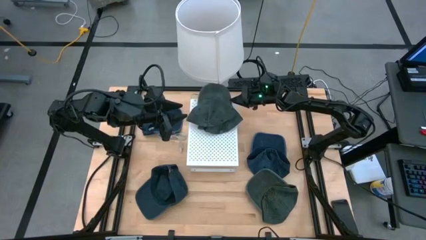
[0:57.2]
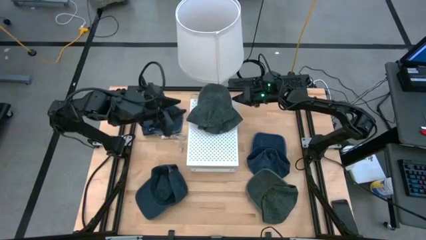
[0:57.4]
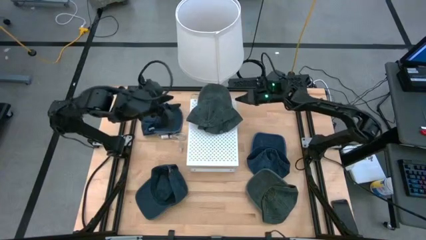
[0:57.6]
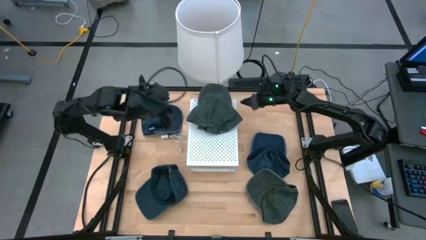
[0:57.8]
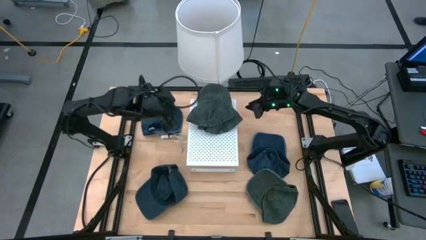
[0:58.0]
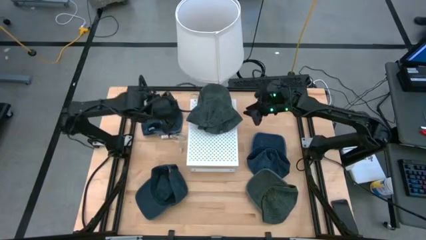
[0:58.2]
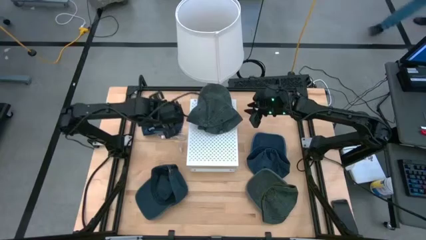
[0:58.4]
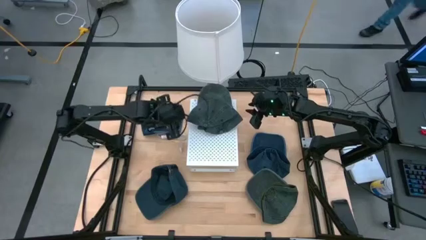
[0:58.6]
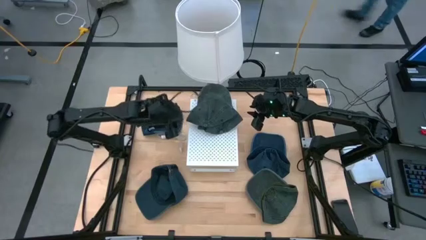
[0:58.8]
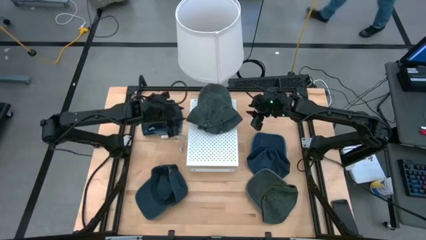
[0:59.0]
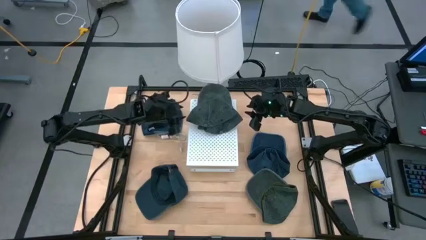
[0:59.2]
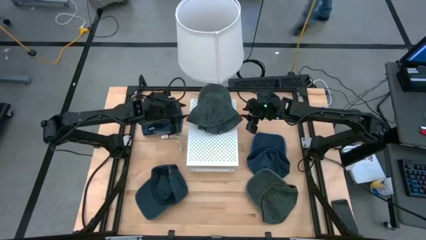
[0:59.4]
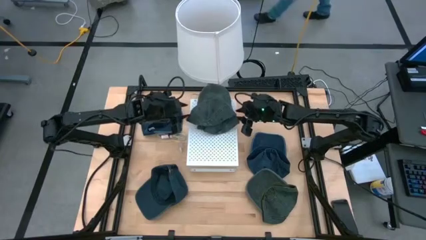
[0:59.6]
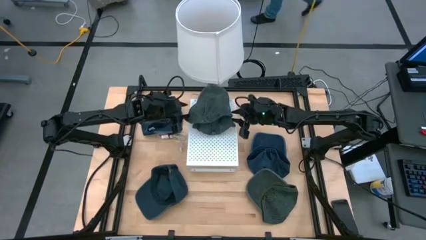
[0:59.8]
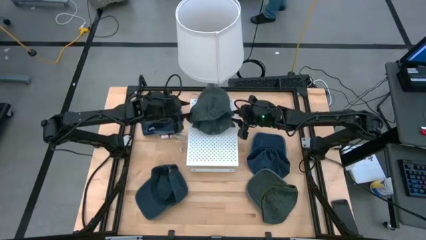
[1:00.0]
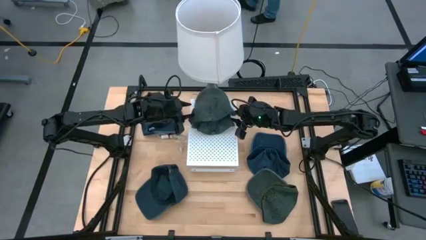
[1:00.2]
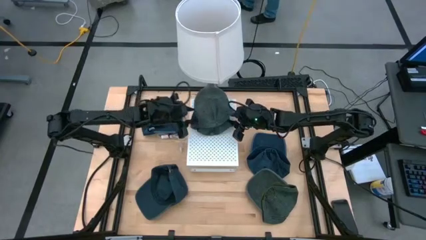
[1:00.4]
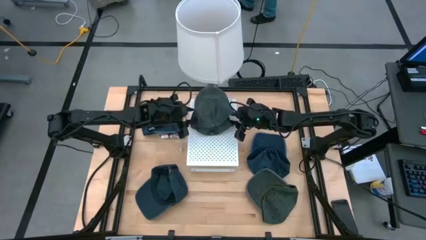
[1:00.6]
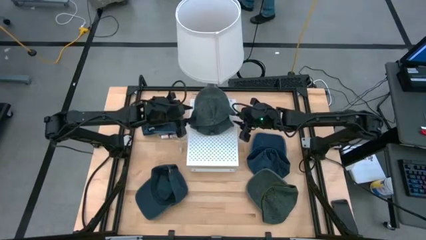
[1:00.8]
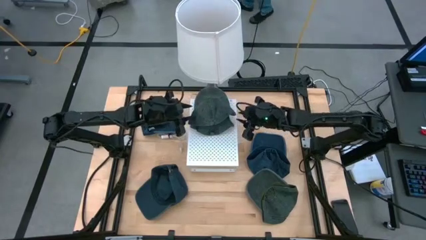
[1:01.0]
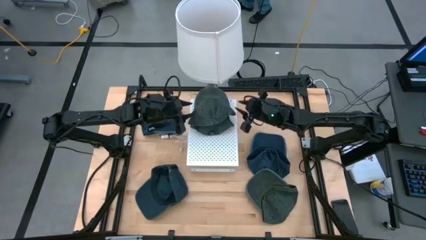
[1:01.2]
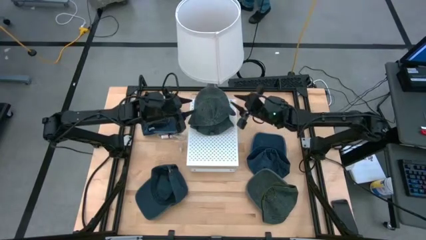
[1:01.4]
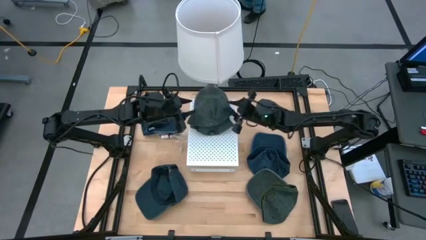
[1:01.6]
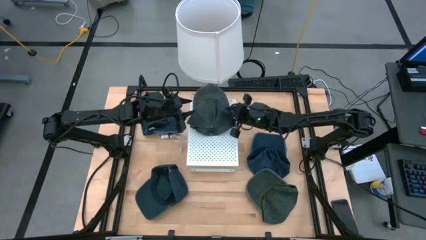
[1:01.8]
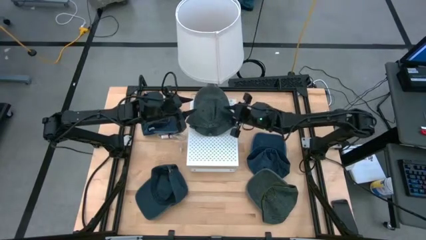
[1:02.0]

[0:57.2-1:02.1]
Task: Pick & Place hat
Adjust the stack of gray caps on the shelf

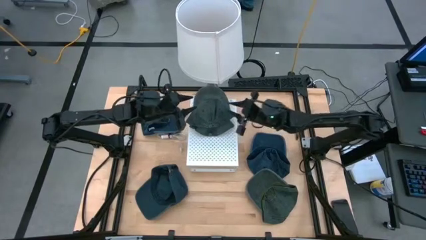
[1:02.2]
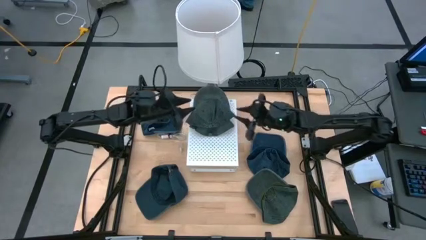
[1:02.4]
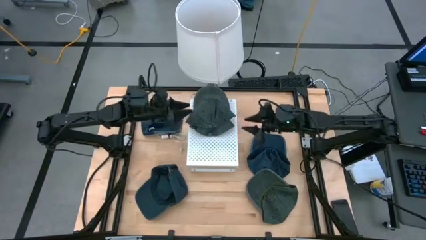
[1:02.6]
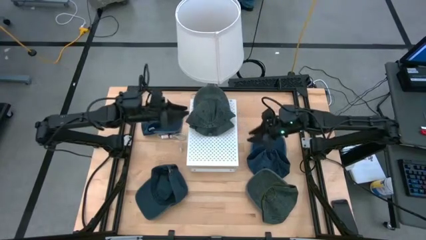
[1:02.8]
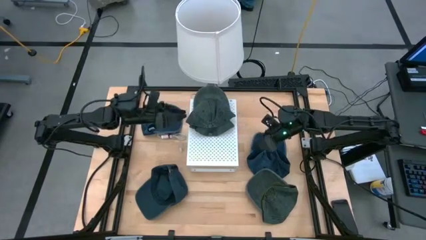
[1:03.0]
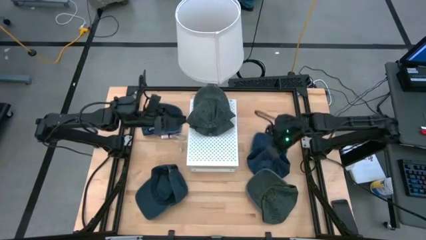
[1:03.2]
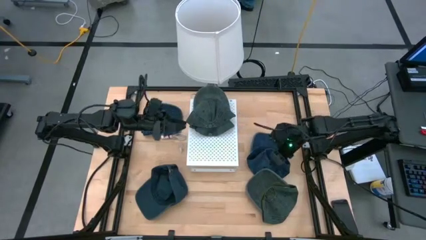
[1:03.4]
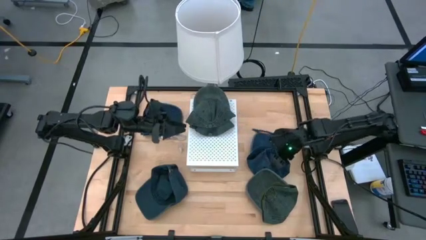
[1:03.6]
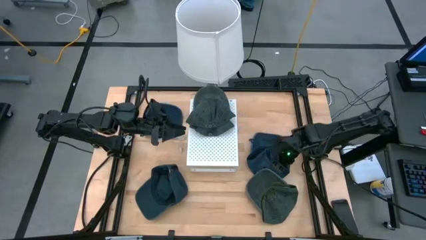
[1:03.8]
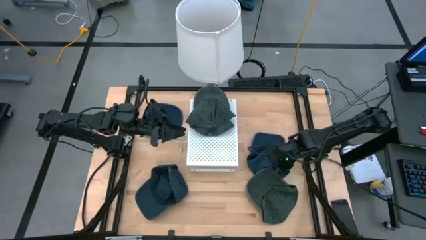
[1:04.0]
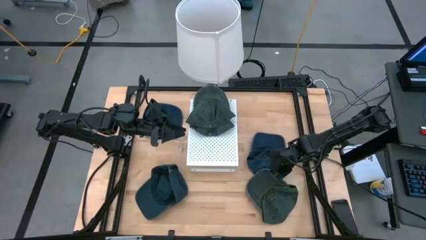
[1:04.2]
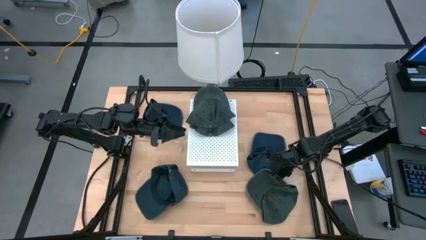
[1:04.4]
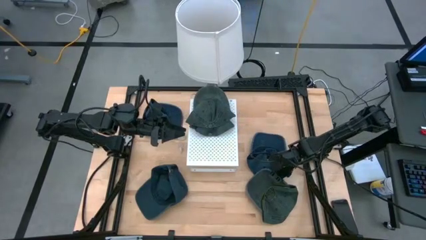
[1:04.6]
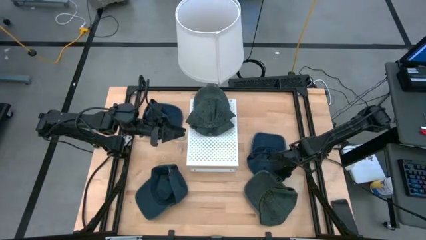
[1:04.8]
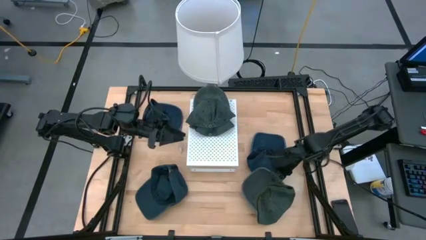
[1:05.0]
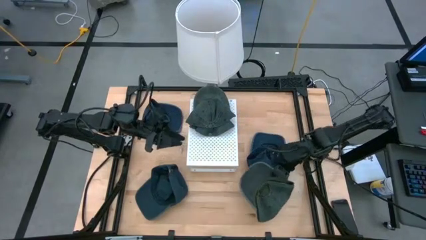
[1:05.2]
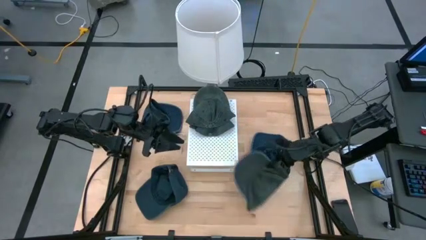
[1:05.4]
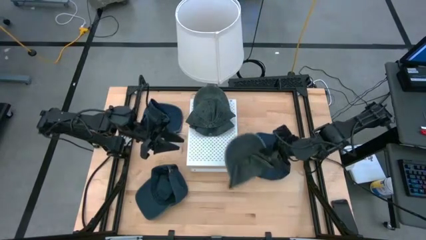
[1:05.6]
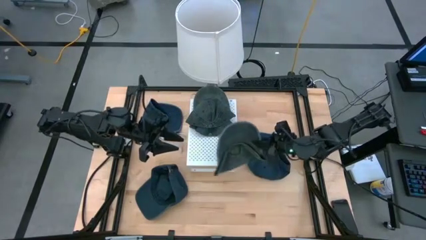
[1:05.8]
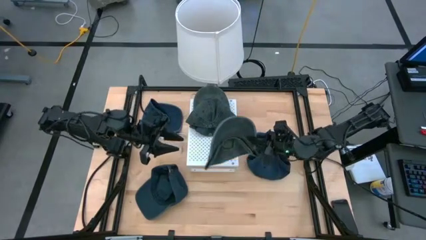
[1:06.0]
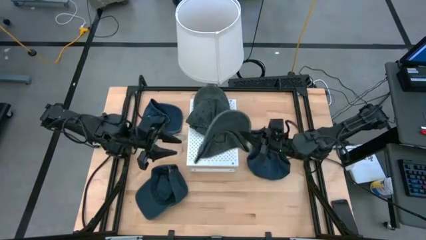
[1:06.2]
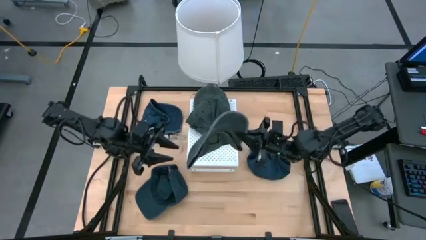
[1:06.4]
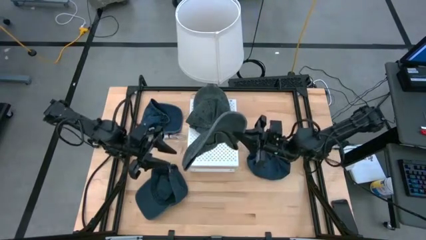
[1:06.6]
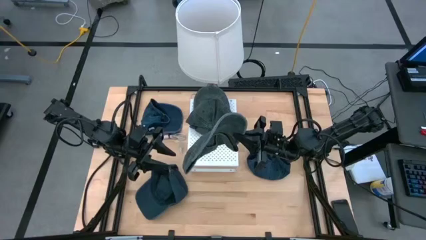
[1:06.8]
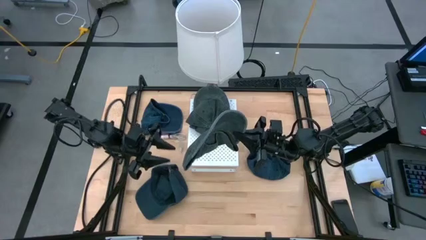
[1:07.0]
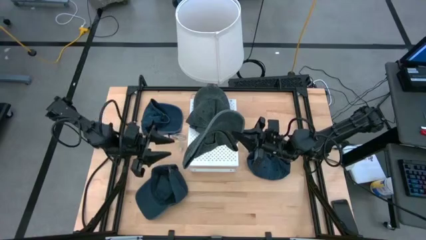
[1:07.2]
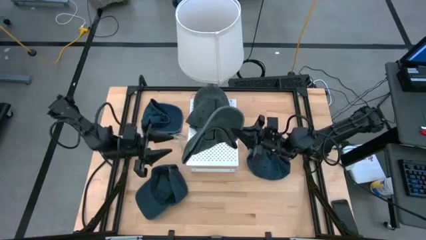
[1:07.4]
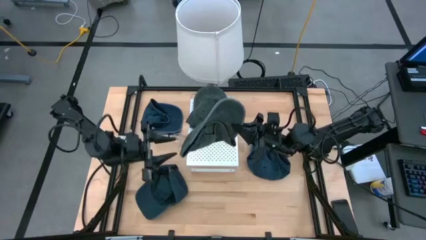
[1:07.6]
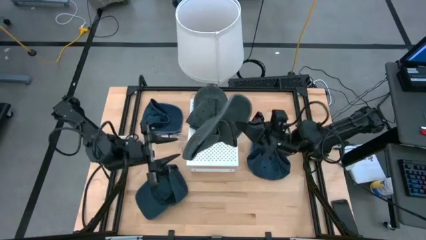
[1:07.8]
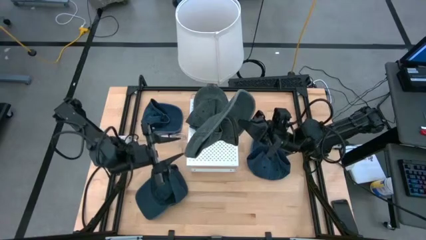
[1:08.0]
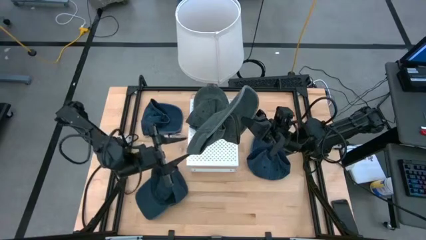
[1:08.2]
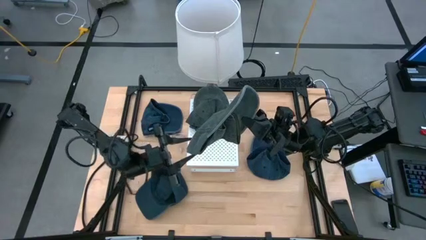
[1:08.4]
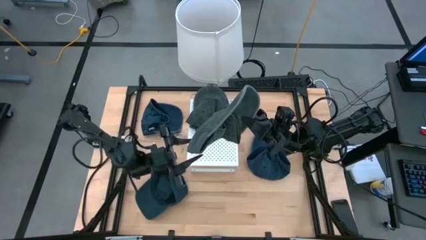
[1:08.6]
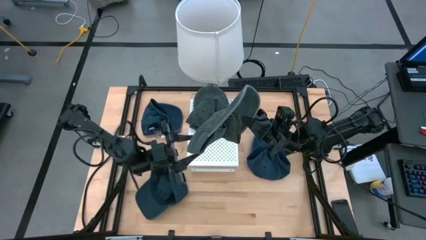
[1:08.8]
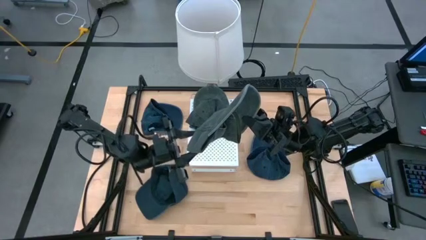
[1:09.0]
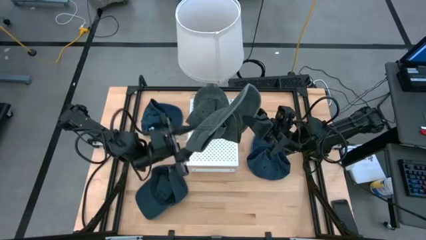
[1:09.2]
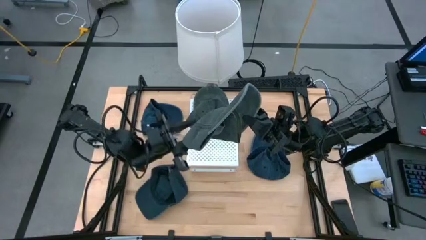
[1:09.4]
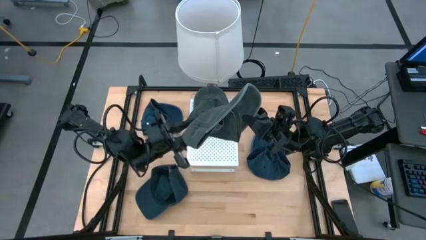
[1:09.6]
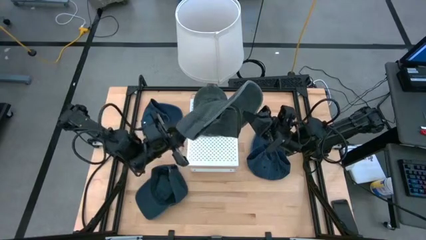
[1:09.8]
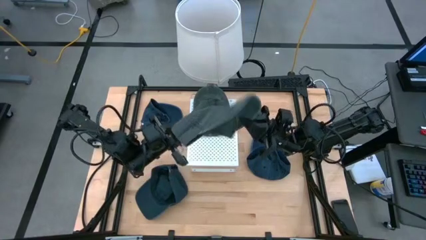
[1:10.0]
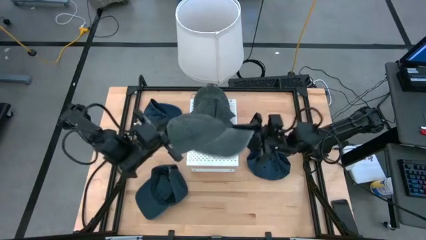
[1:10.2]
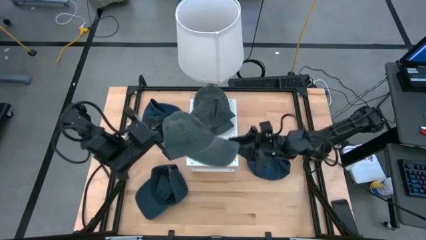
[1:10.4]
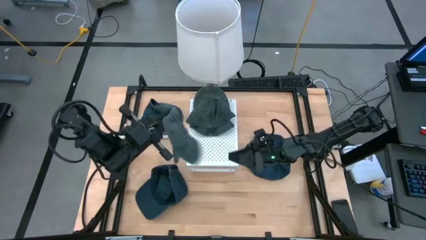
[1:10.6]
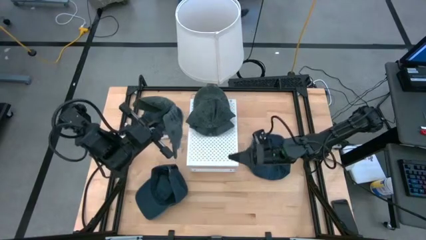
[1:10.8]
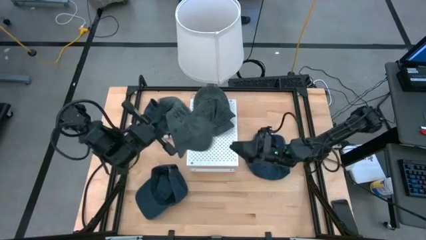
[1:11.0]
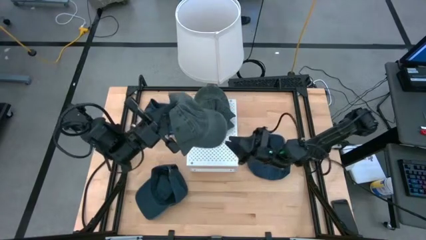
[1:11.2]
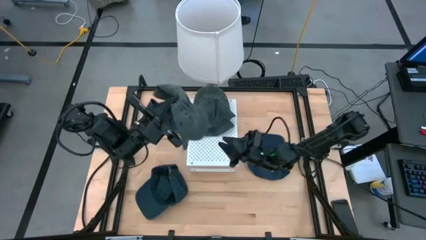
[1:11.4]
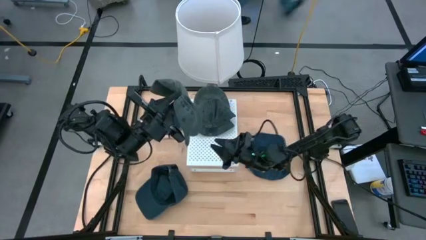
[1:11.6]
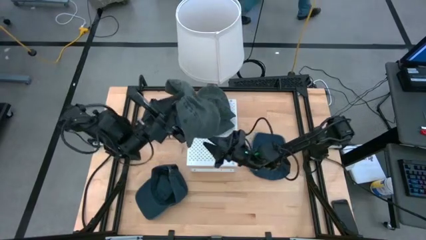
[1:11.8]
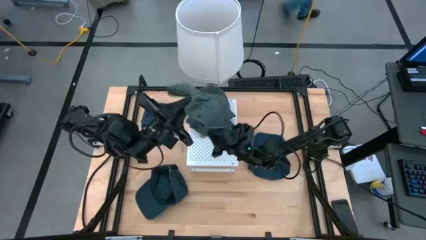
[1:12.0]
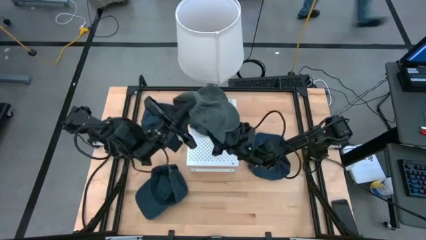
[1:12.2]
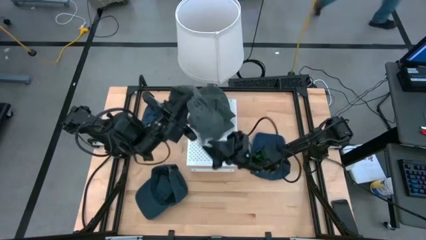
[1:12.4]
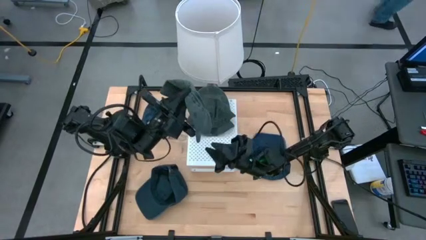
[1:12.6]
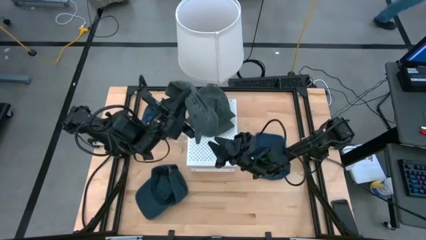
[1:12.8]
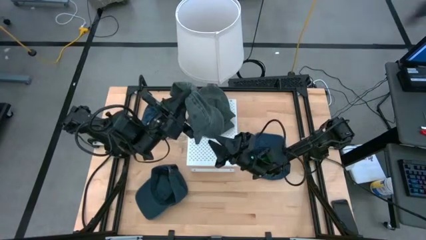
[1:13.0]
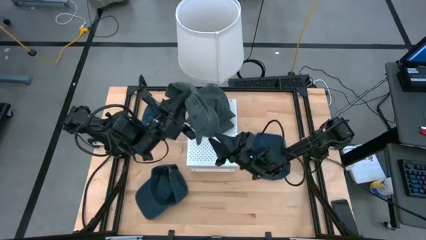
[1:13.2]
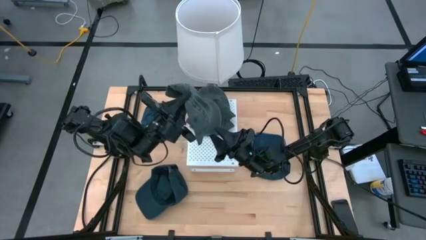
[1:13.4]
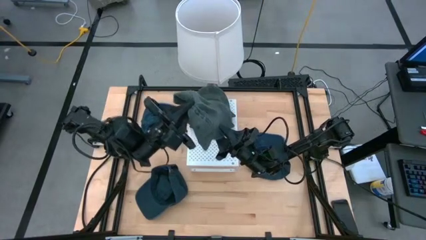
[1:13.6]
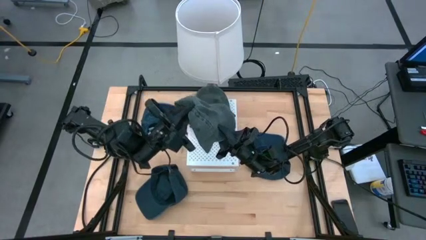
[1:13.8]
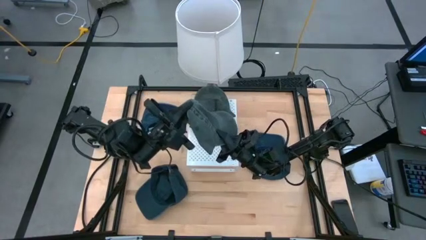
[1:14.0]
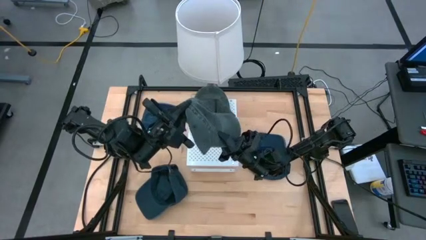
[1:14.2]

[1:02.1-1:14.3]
Stack the gray cap on the gray cap on the shelf
